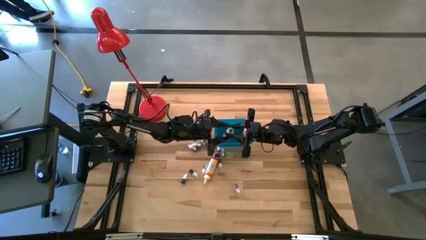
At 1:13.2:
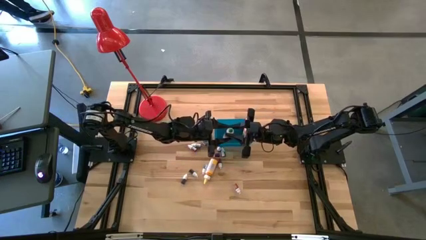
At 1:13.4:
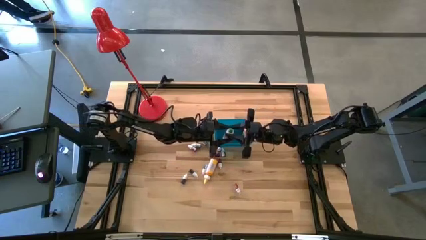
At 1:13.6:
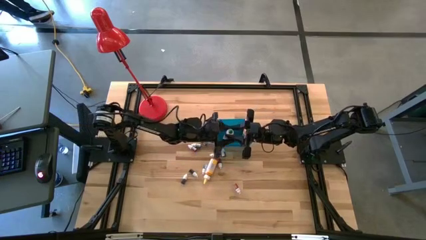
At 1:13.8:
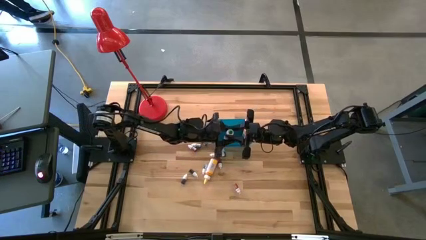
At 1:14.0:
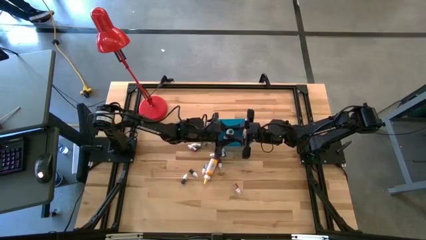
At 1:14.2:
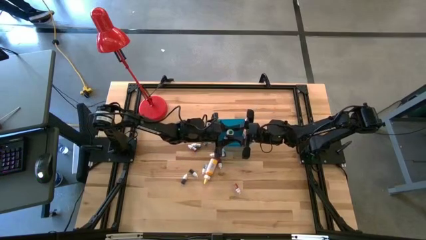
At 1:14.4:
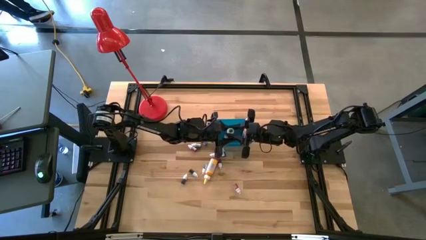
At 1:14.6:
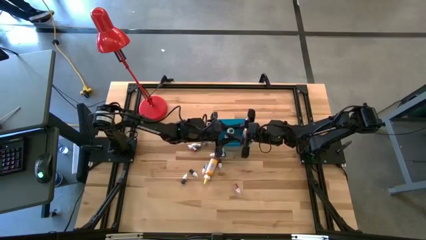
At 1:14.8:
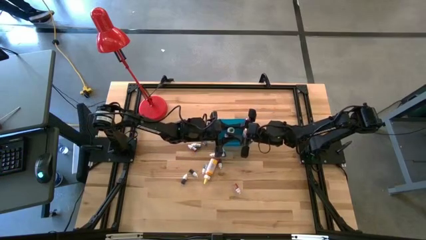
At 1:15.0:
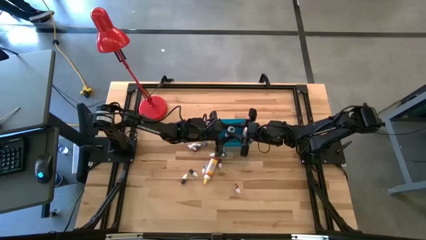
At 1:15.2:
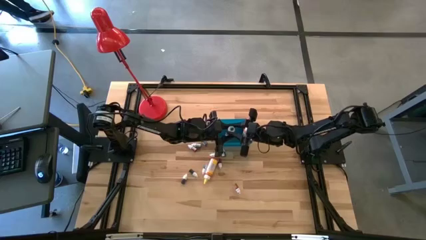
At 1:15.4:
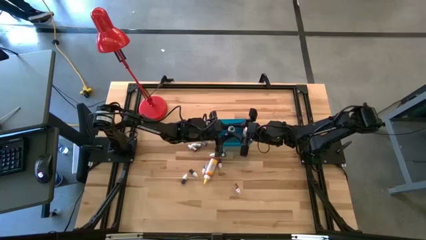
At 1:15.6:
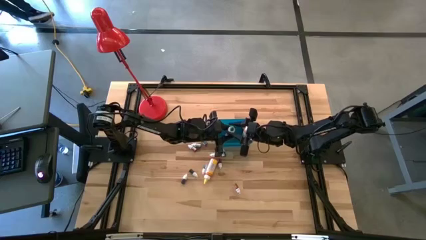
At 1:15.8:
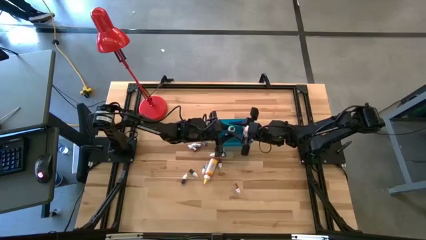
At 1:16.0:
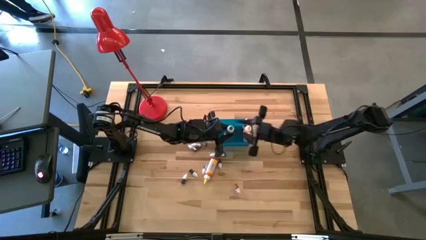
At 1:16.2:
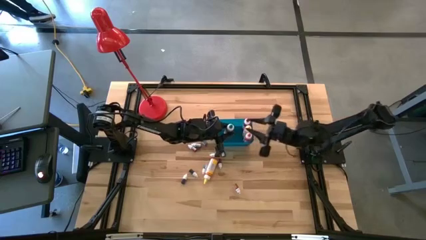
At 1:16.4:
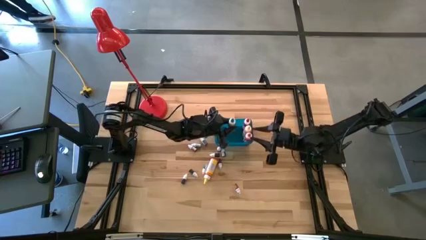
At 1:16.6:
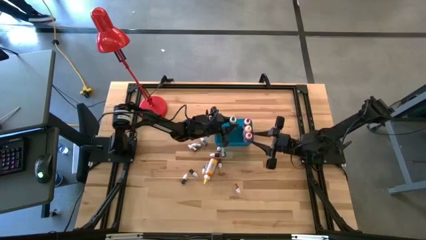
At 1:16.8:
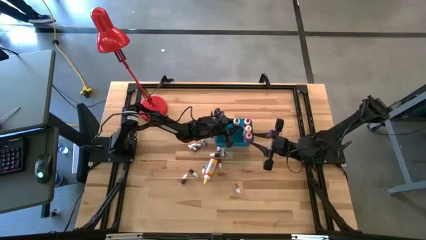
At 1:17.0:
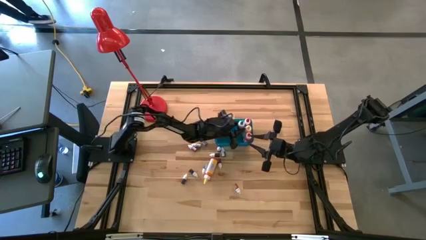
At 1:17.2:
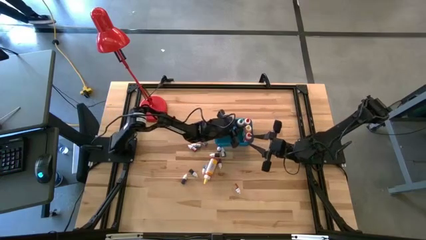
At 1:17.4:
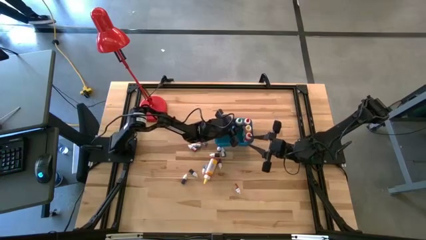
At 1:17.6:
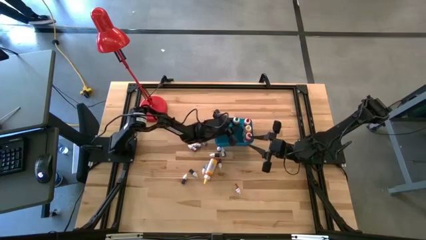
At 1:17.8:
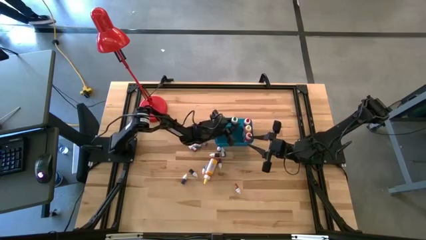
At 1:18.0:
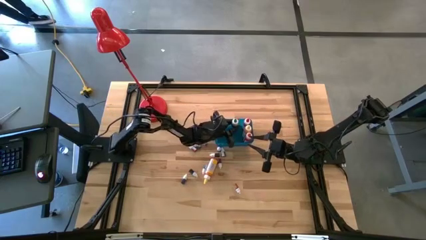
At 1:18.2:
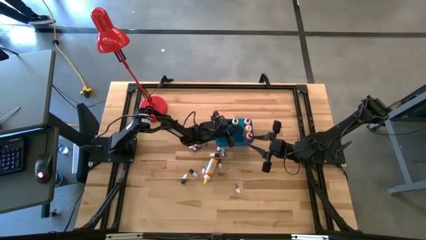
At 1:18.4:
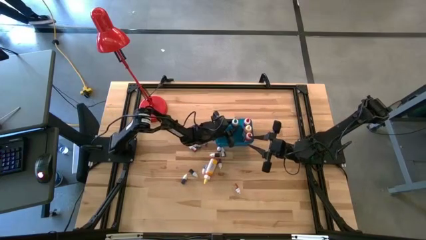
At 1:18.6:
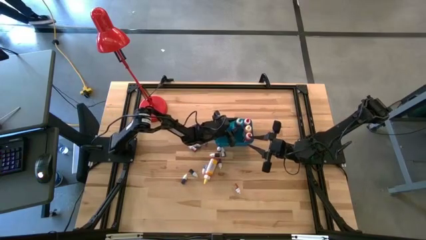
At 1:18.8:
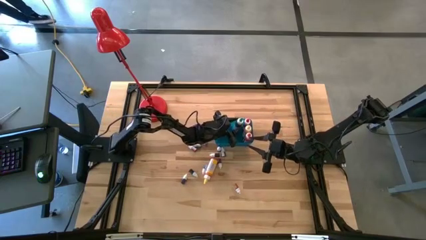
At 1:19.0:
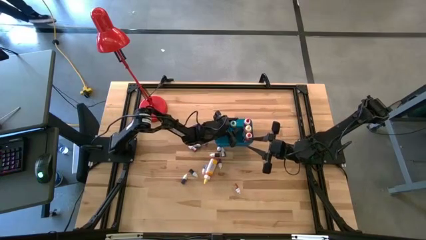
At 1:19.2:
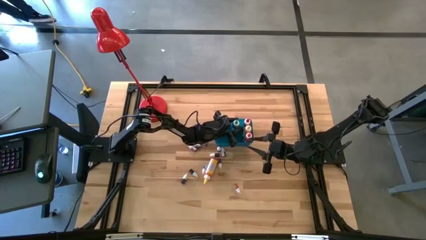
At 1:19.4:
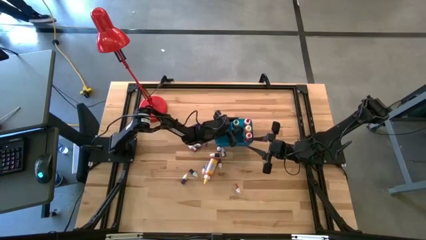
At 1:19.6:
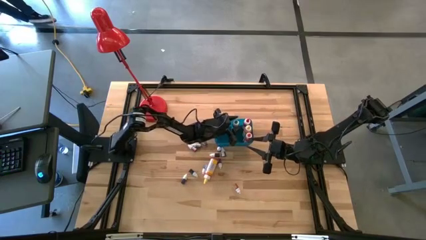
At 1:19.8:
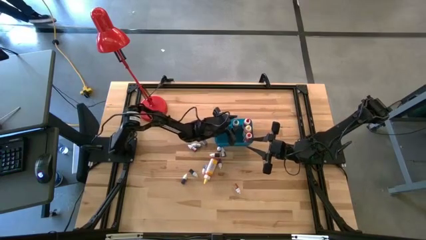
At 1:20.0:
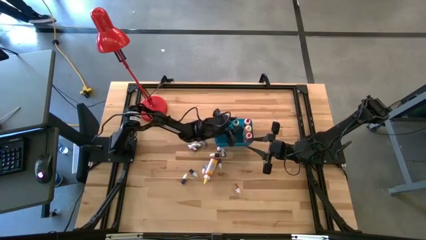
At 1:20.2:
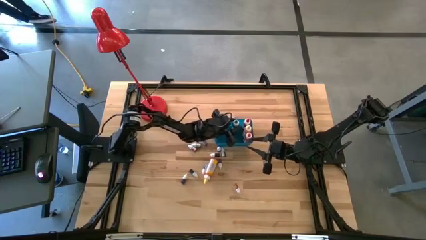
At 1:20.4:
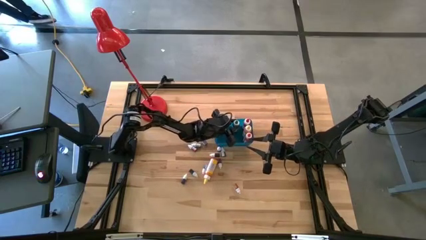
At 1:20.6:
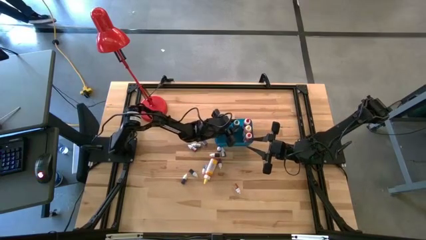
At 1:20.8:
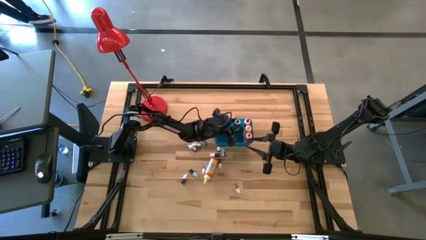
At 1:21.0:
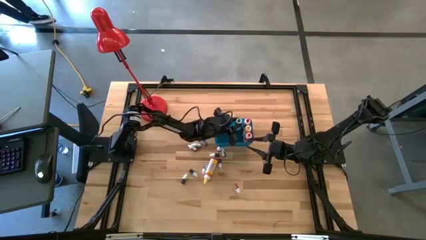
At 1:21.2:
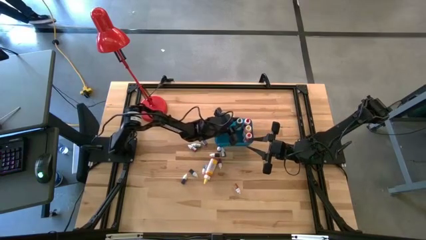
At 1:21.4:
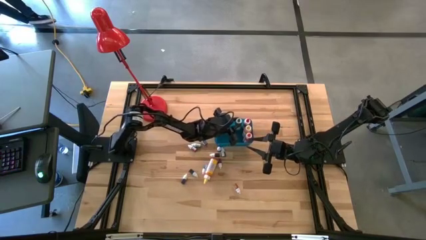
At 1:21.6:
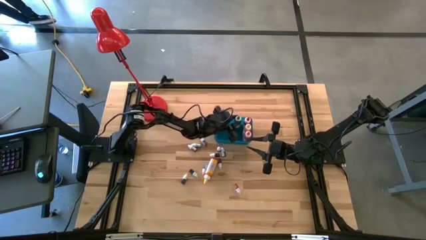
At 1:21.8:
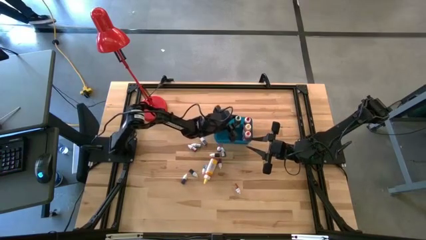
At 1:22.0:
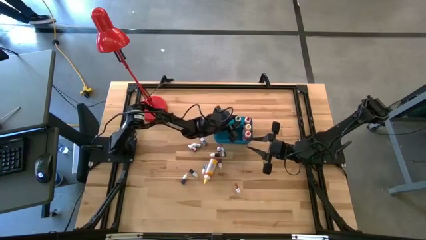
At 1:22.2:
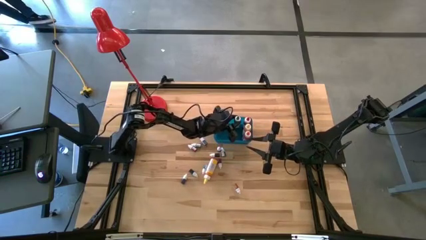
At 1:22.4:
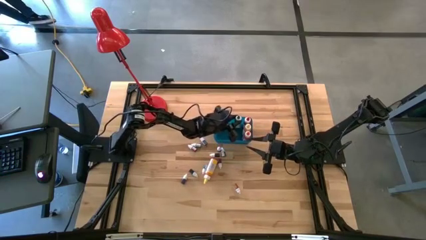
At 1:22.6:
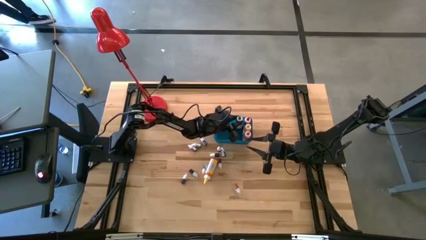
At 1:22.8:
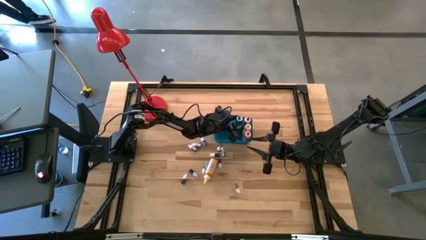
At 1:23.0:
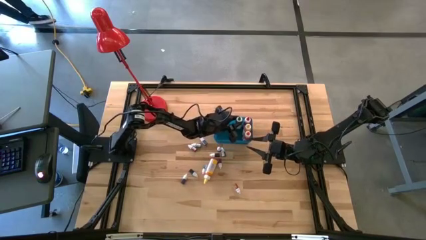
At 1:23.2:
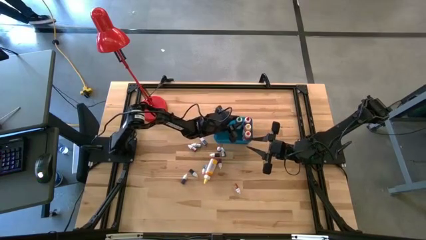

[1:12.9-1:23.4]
Task: Pick & Place food coloring
Put the big green food coloring bottle into the blue bin

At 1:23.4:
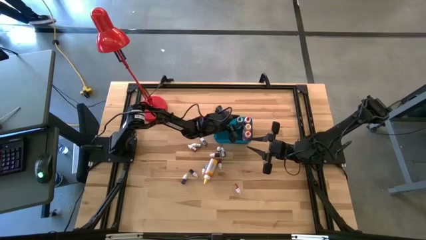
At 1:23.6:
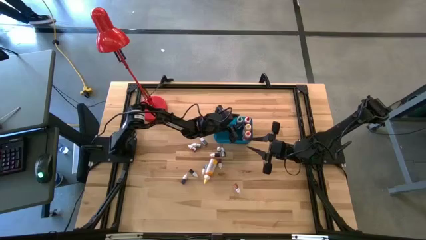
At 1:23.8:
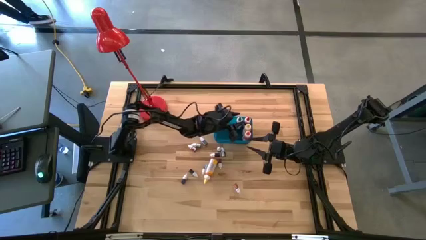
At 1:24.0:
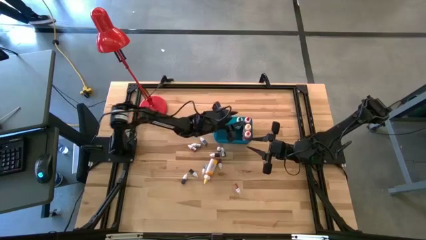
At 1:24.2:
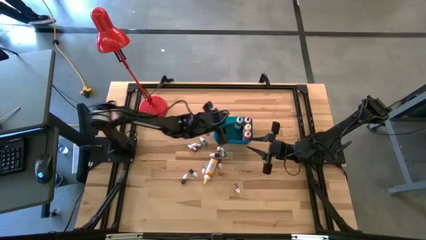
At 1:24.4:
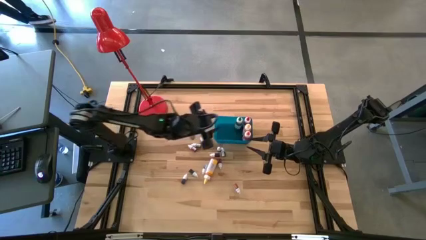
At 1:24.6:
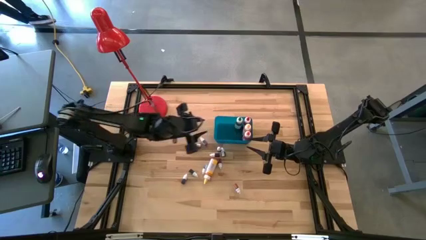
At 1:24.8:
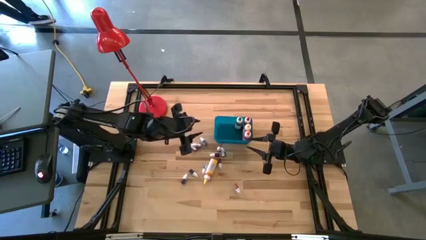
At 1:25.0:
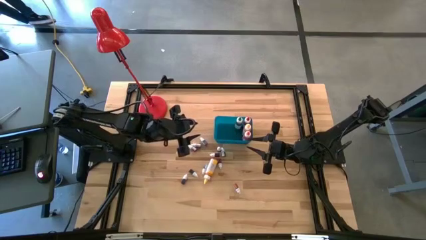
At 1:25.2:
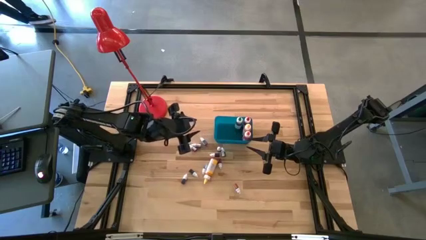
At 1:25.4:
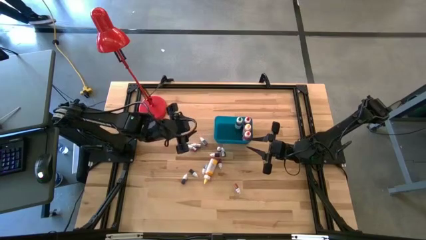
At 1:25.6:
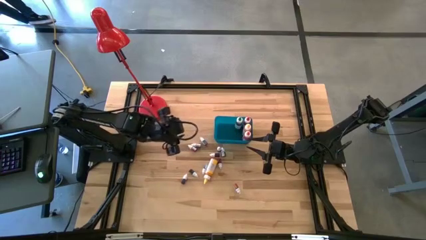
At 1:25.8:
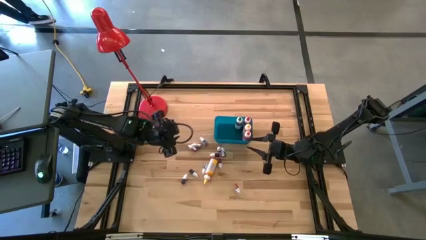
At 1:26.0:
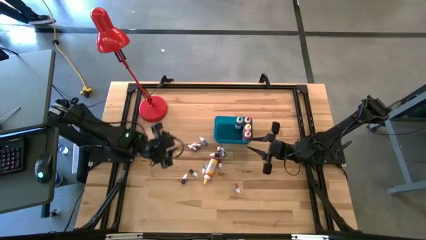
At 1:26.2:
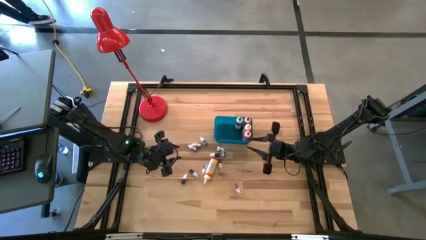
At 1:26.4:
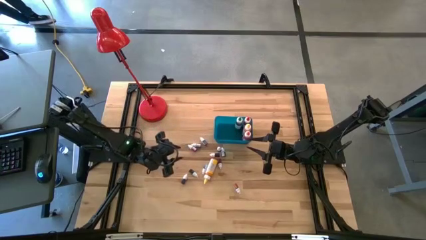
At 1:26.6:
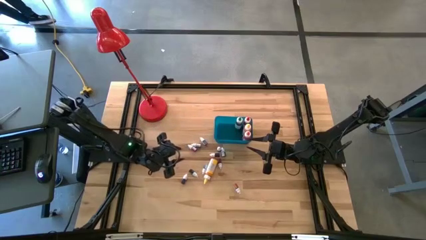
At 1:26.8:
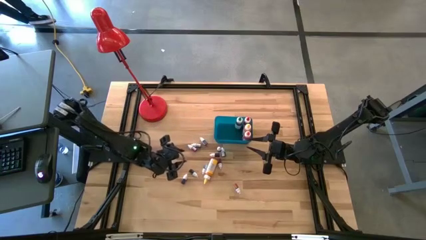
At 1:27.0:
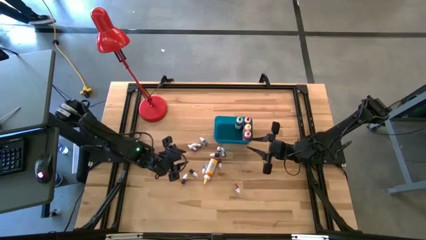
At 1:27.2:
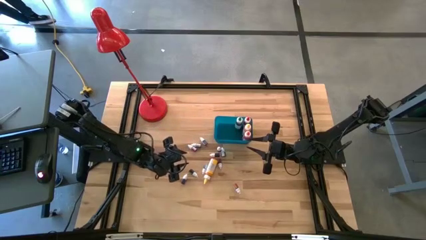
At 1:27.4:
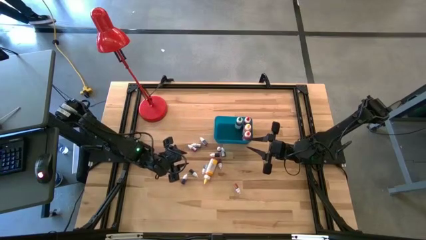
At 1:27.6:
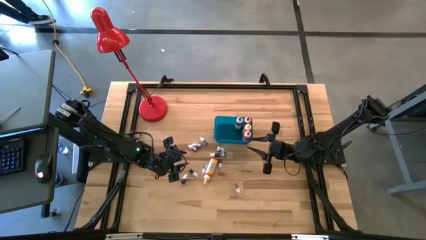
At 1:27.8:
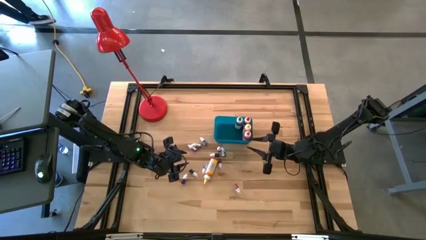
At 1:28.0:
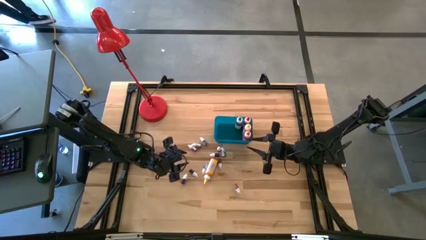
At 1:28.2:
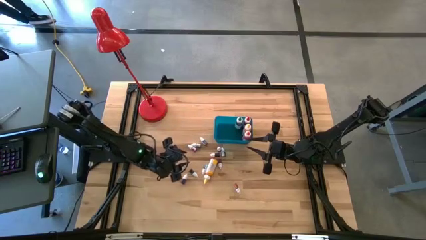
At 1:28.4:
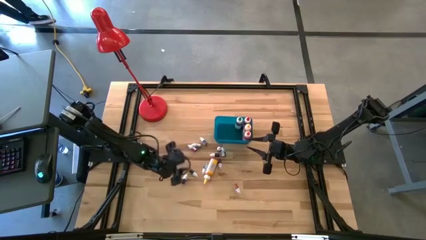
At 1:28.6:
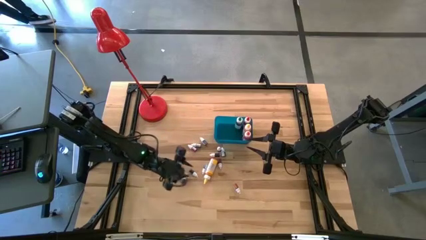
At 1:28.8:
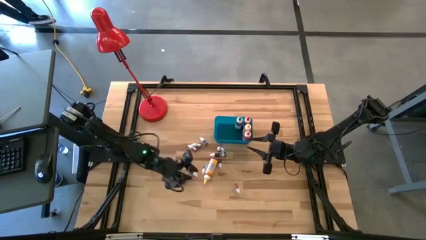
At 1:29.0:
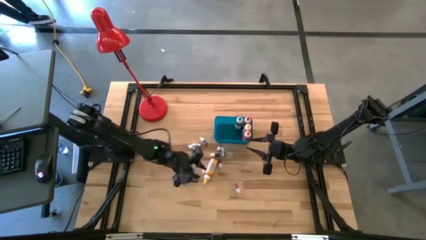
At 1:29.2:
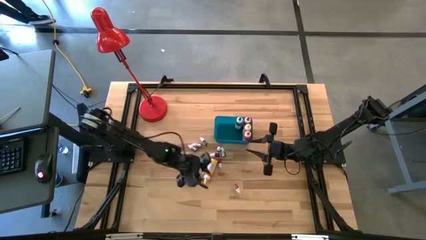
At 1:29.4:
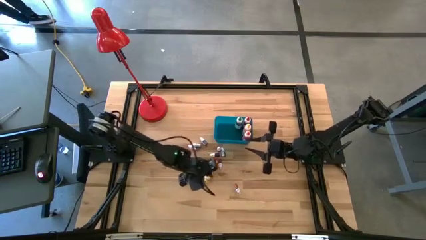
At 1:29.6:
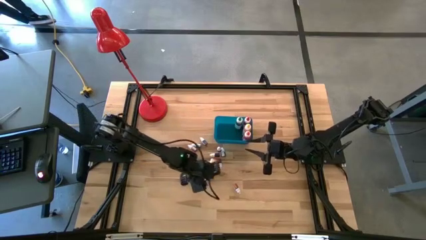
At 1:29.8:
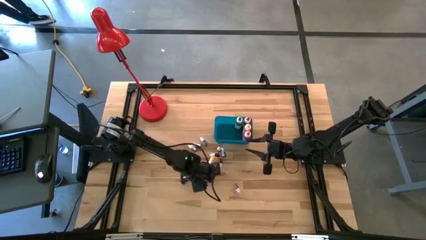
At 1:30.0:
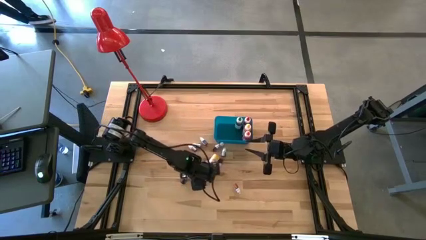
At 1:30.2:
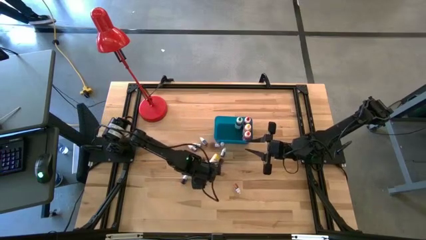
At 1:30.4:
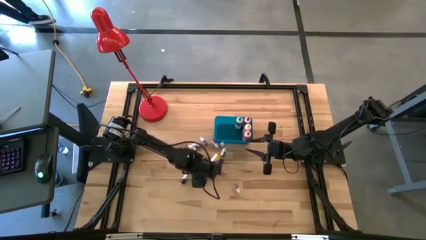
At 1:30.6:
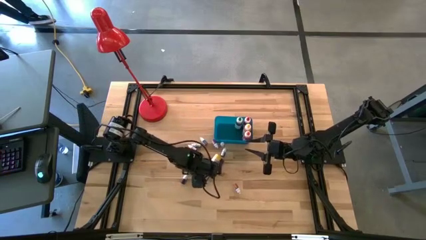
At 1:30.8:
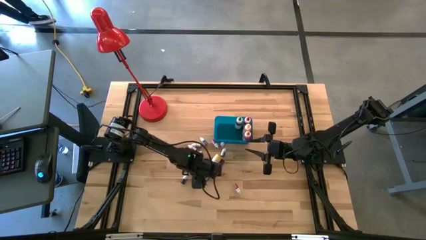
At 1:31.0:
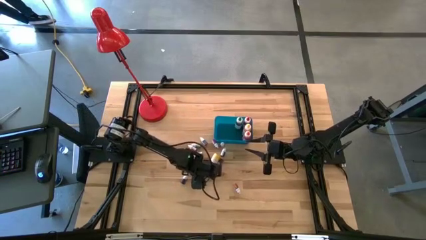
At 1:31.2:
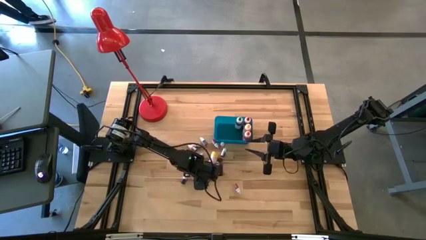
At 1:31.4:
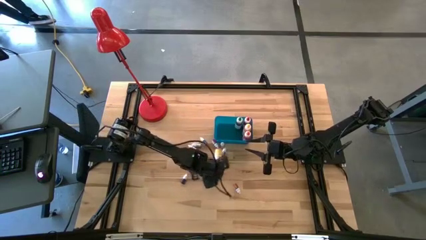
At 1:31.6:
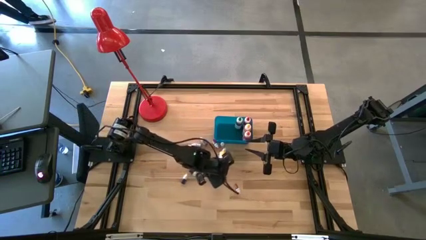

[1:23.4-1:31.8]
Put the big yellow food coloring bottle into the blue bin
